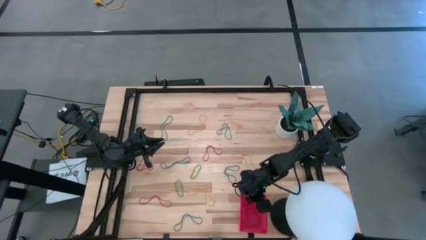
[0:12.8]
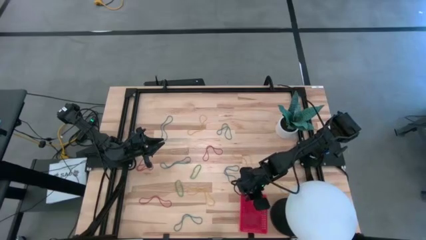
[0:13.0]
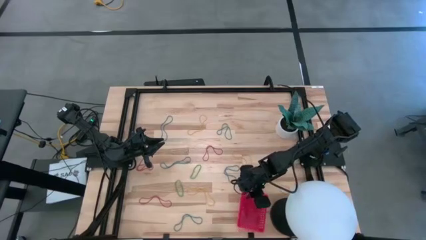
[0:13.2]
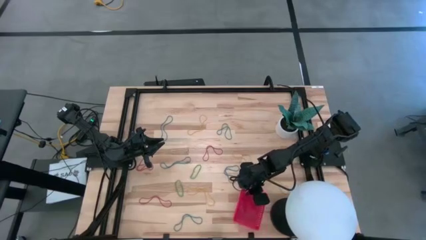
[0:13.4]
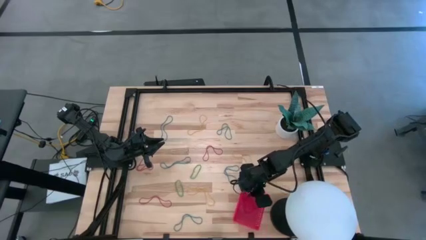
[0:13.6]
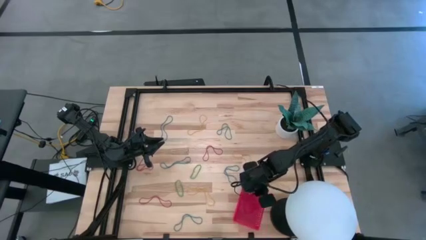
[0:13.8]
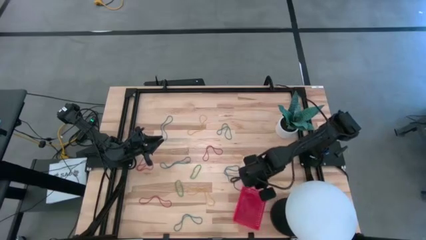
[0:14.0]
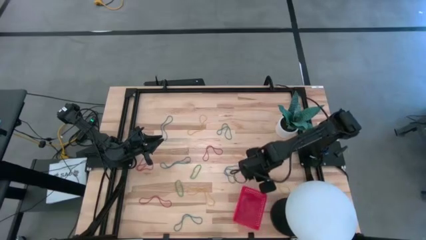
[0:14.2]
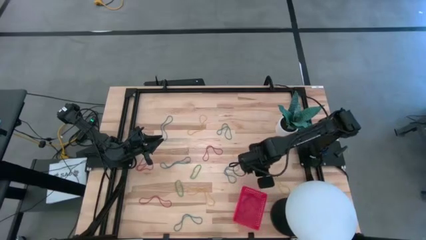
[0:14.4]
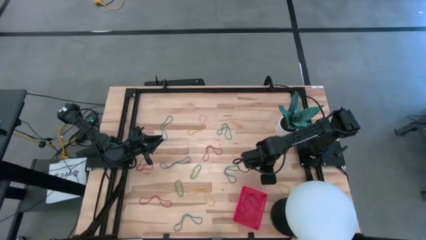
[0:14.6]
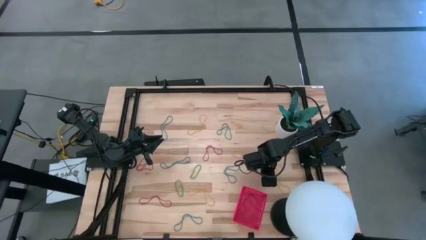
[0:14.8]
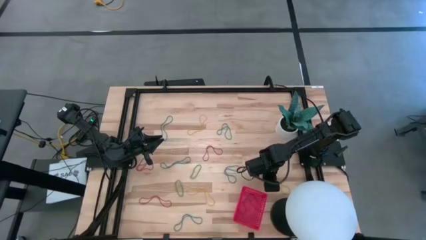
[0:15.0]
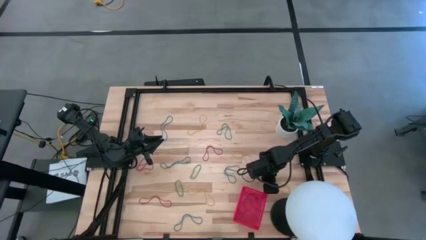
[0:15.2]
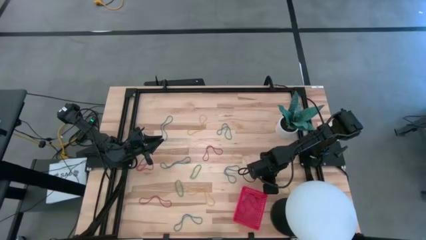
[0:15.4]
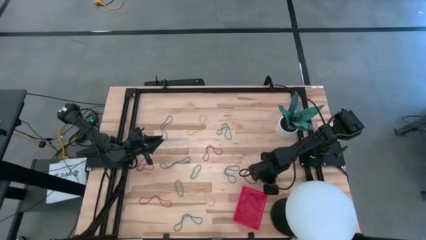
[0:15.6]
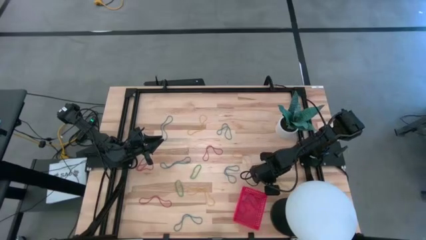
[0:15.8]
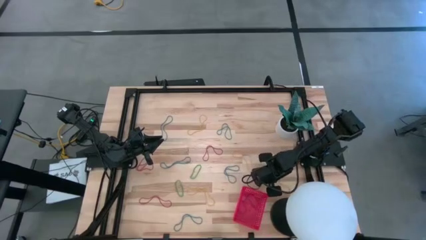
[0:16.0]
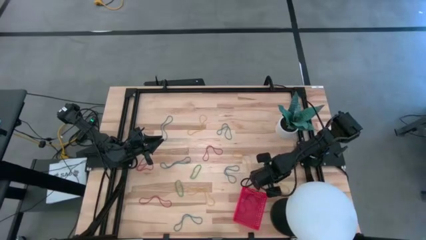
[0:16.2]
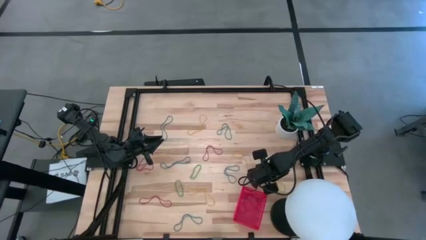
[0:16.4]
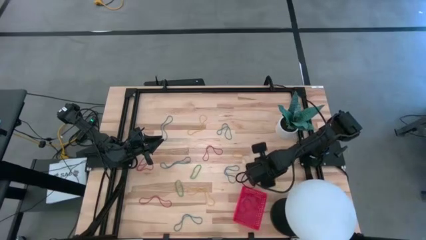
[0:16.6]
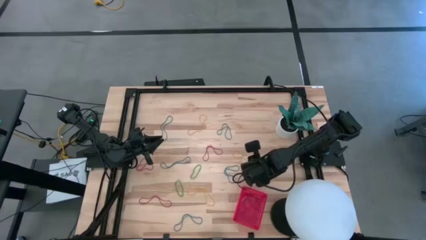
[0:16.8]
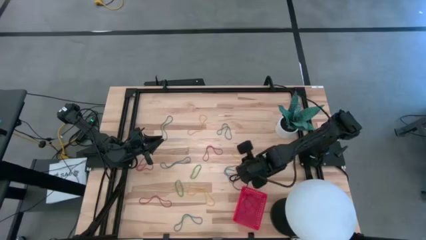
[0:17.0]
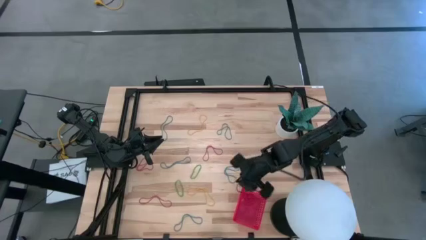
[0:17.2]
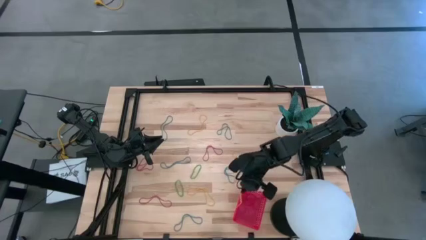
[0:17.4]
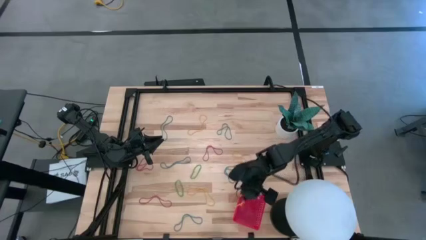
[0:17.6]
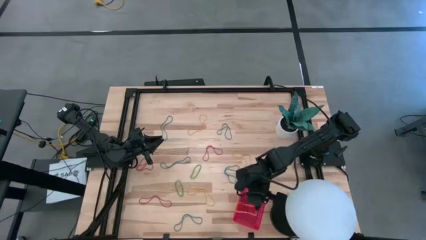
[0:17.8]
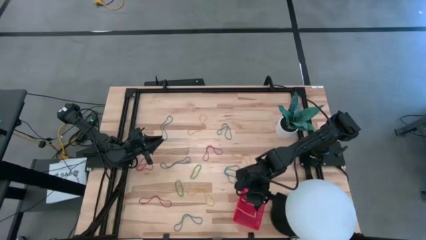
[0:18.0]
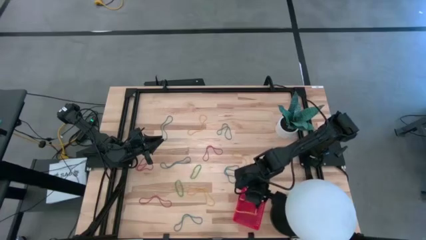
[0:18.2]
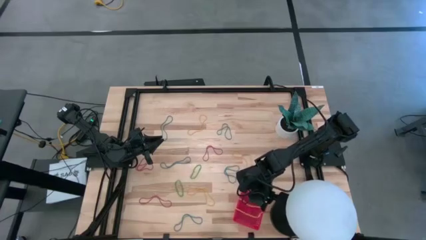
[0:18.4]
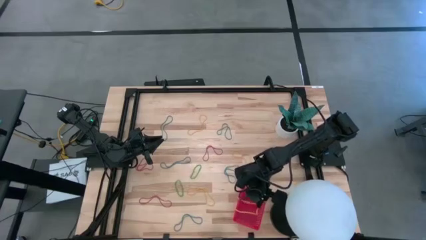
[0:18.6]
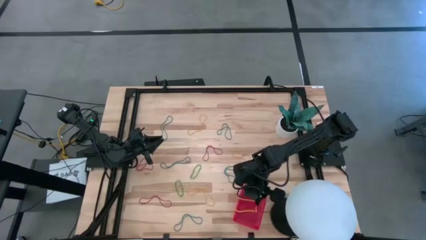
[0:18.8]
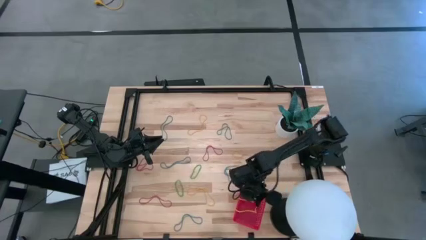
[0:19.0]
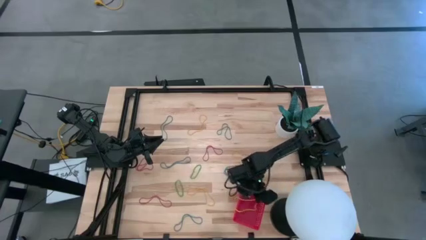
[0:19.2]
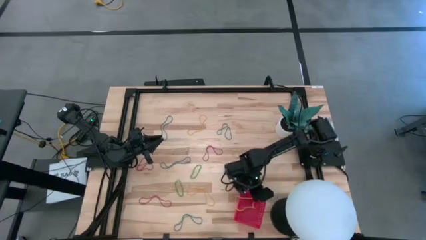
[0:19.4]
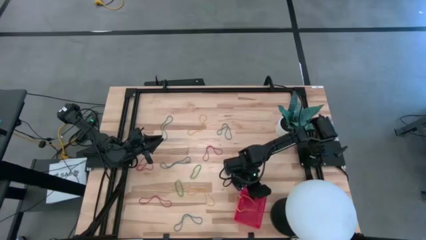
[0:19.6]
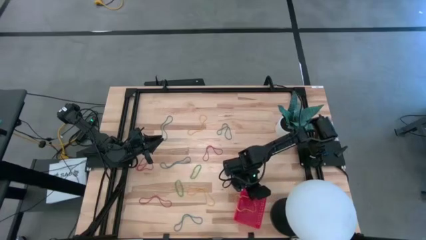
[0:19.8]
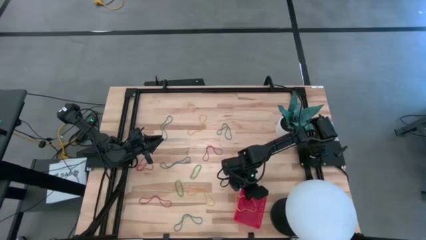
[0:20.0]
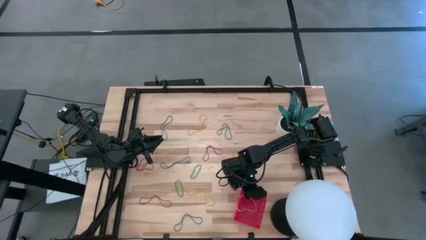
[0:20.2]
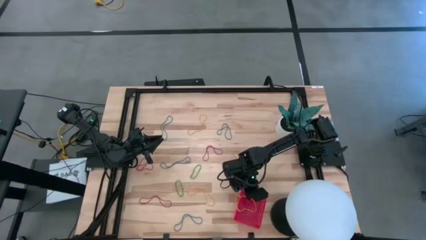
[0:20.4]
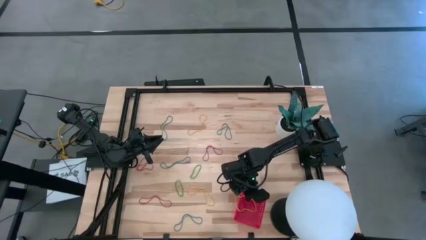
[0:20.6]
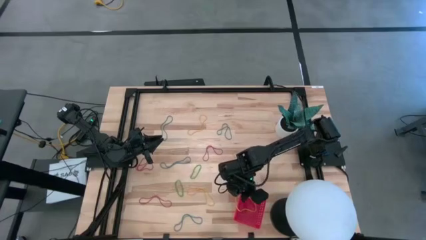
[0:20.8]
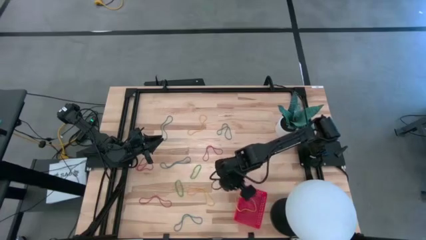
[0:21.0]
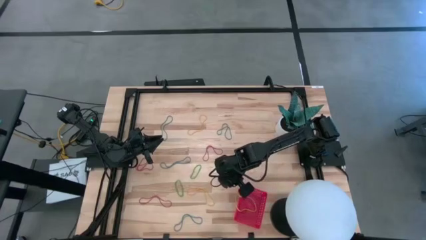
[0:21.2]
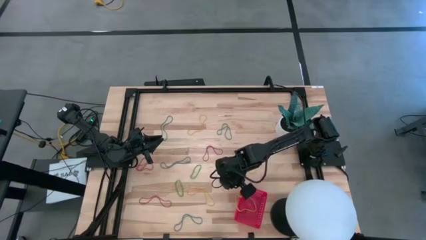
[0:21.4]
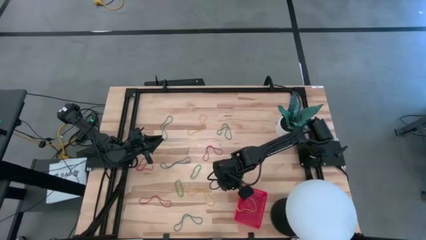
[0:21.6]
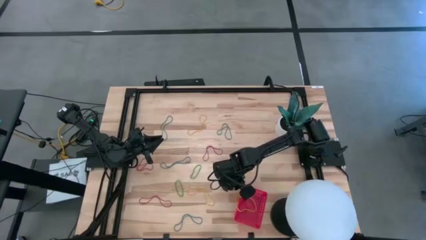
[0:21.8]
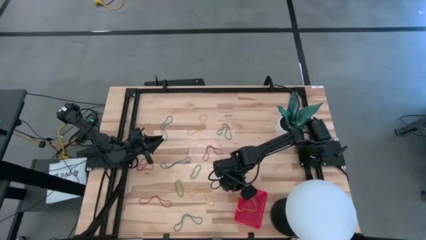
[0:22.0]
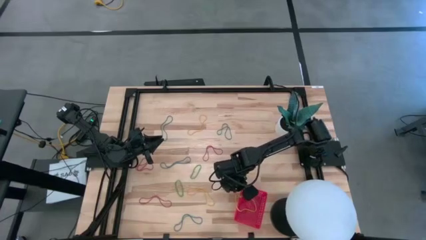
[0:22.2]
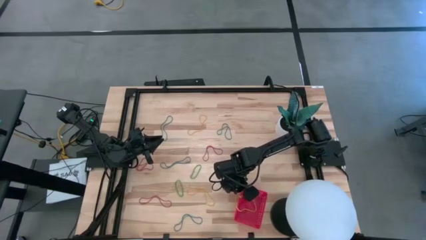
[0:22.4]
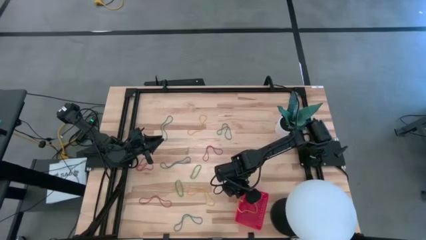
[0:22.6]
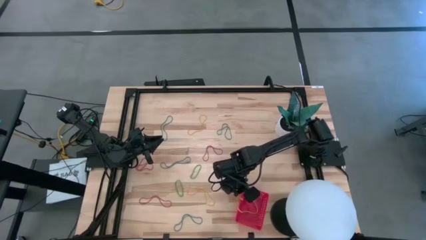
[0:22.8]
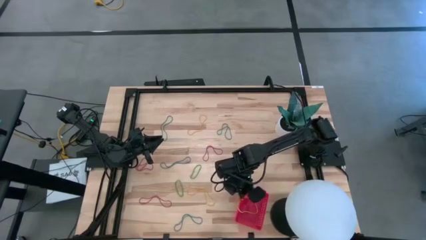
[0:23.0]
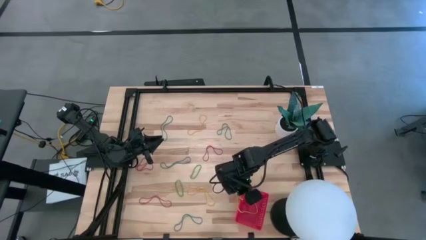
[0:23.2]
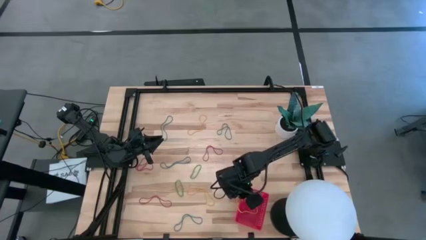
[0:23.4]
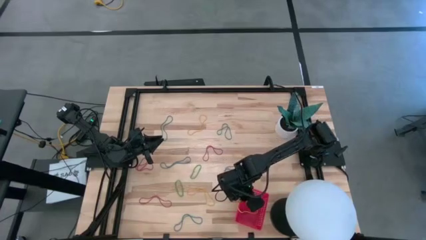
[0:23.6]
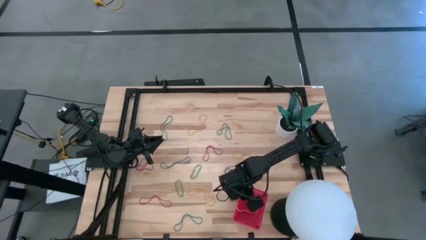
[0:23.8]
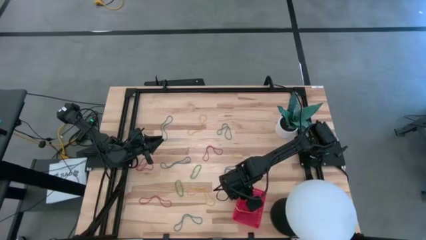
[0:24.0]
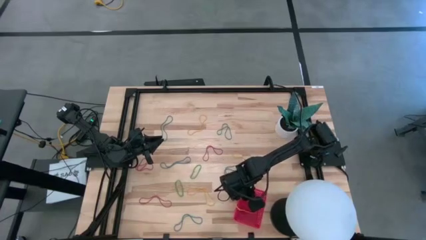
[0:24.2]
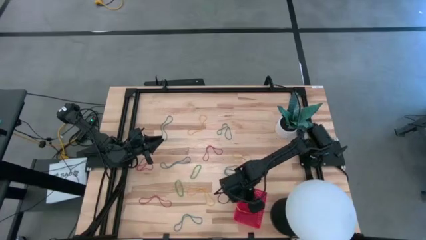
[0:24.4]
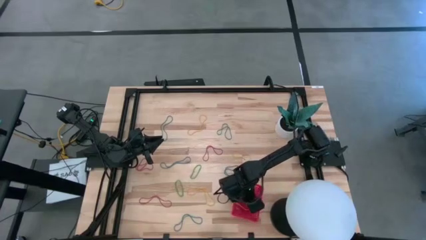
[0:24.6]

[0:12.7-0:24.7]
Task: Pick and place items into bin
Put the yellow rubber band into the red bin

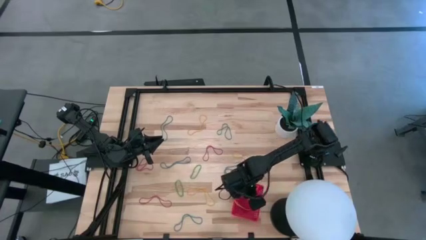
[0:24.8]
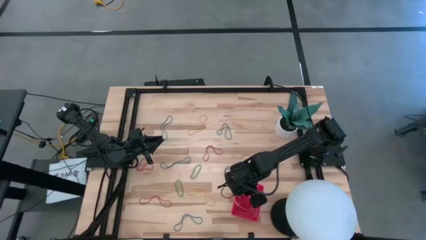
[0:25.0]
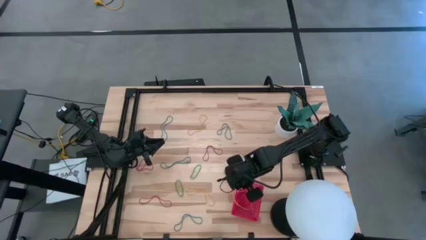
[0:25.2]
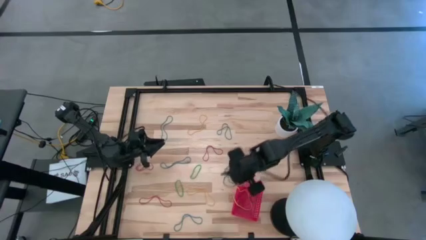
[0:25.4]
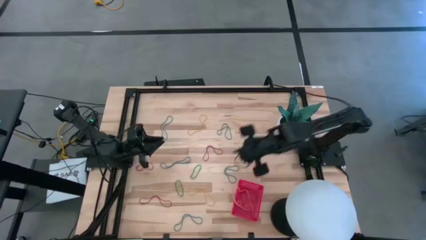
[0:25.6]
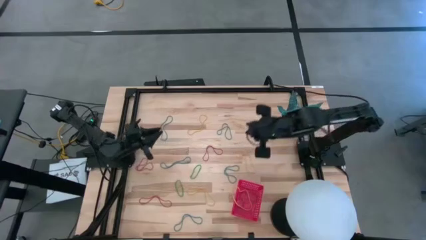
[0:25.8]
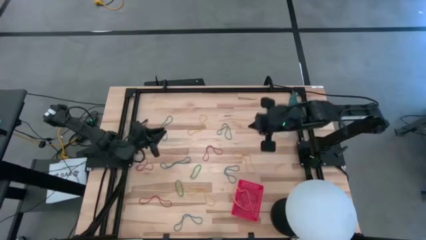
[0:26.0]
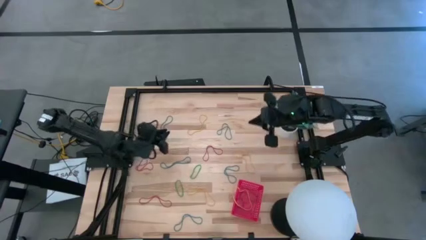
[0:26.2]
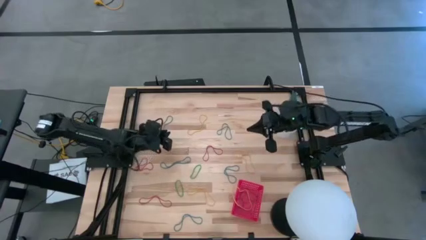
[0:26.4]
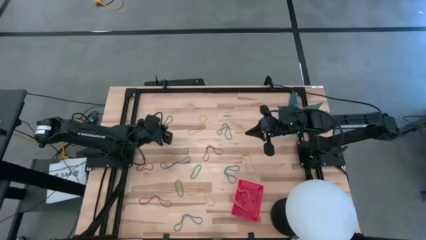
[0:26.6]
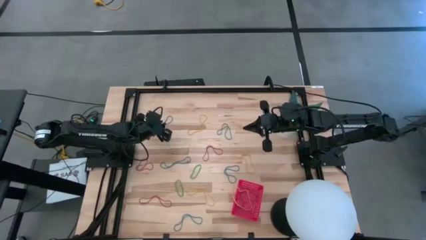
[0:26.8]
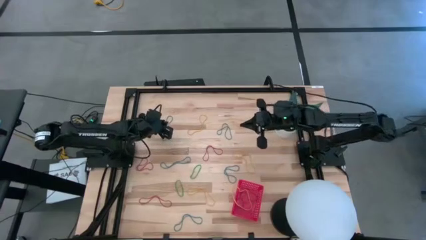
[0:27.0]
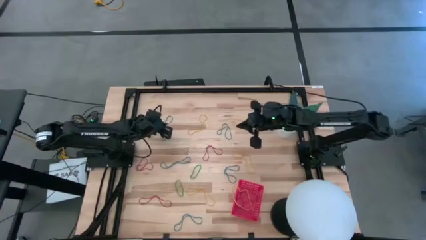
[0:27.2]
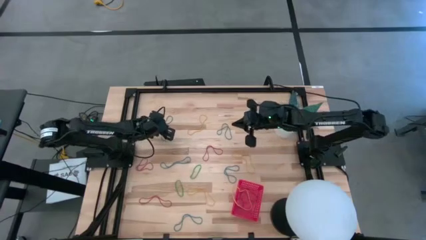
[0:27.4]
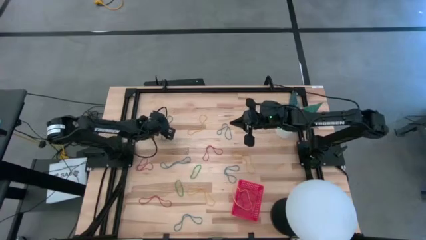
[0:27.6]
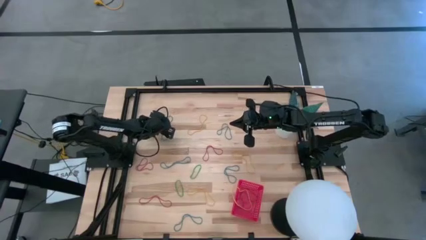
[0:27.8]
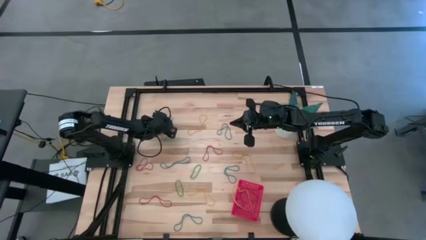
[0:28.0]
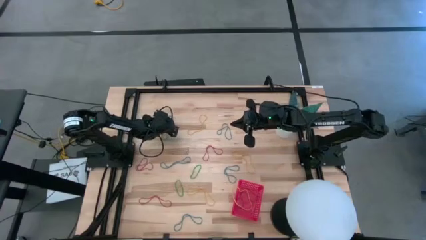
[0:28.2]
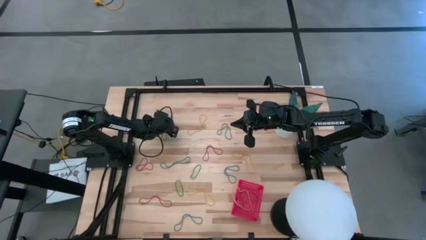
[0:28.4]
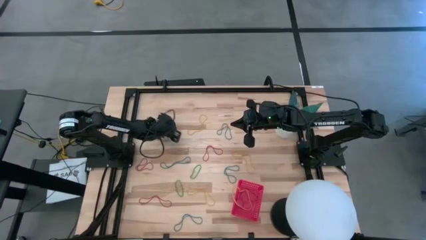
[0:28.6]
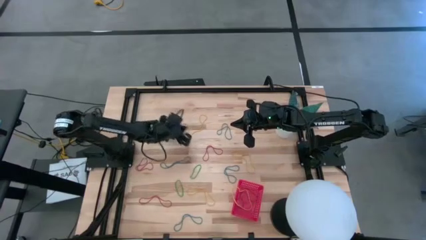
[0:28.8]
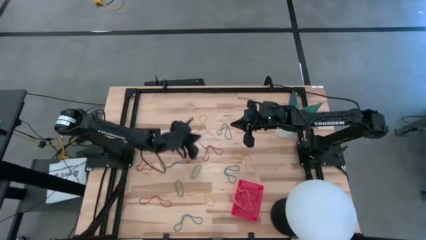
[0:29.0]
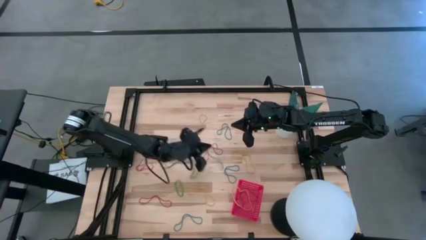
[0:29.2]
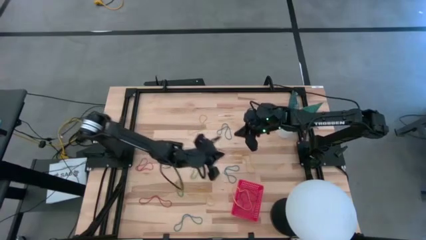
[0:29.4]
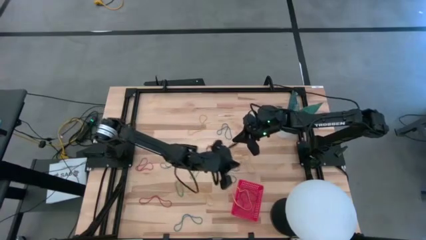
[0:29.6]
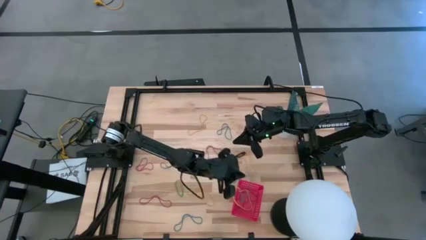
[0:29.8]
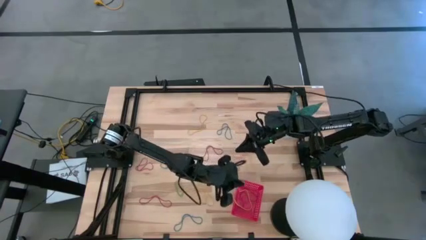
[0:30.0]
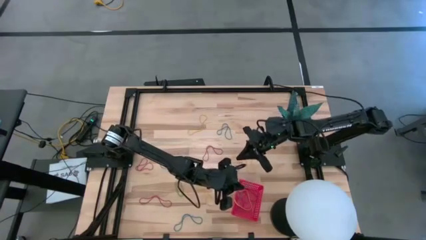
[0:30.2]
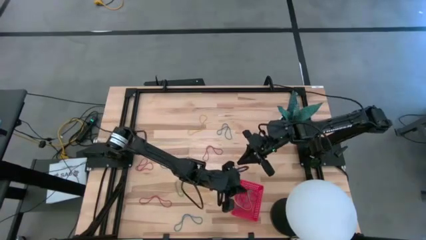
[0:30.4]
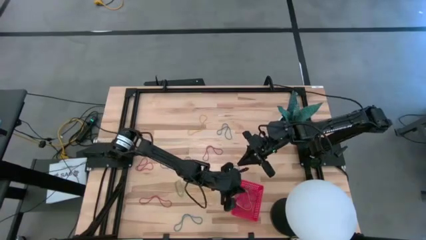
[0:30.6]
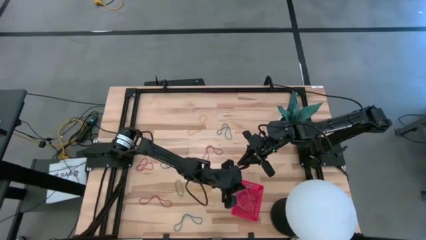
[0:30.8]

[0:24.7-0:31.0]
Put the blue rubber band into the red bin
